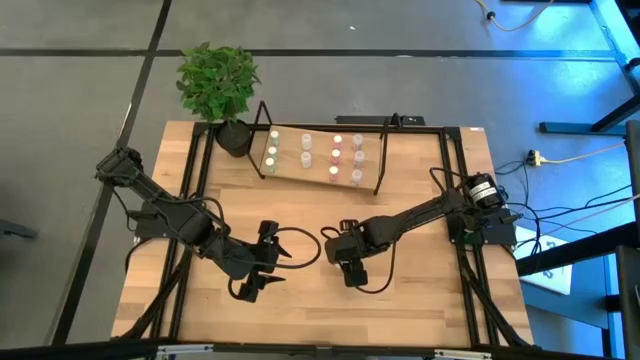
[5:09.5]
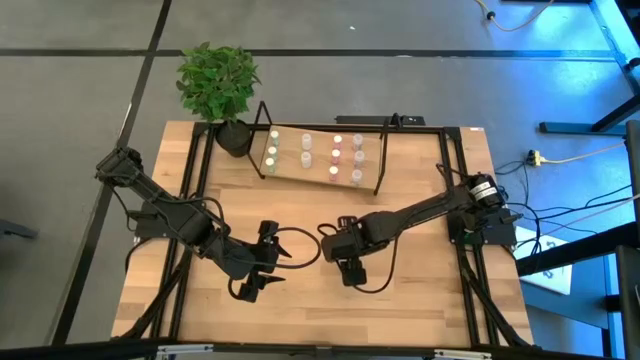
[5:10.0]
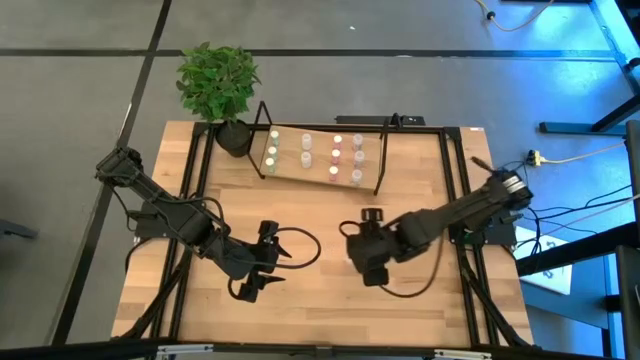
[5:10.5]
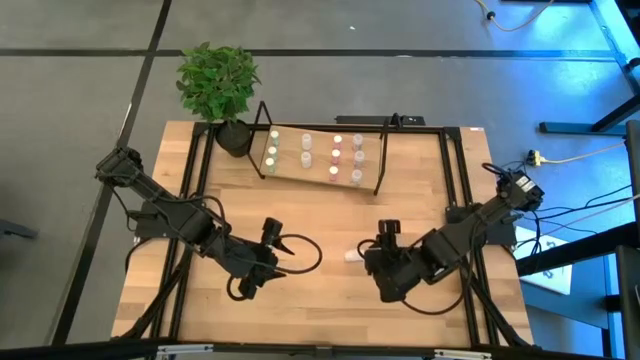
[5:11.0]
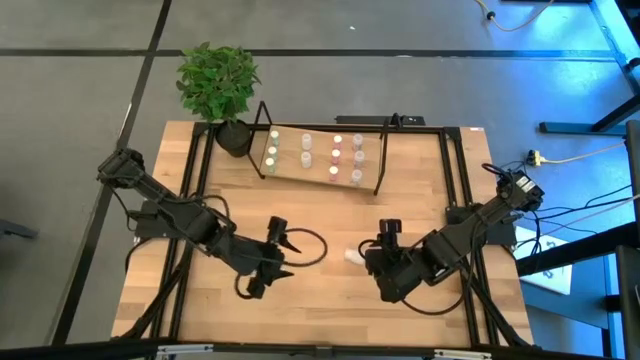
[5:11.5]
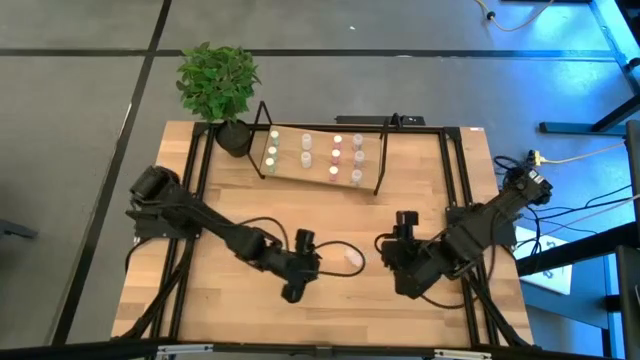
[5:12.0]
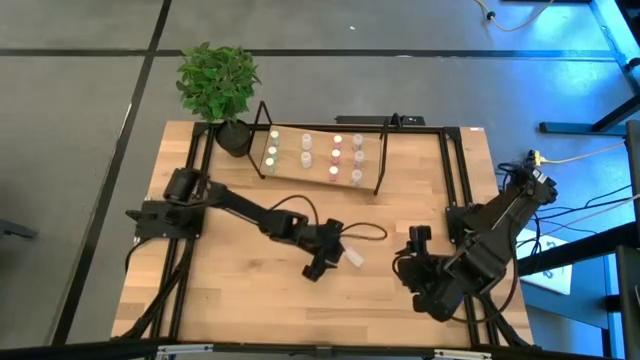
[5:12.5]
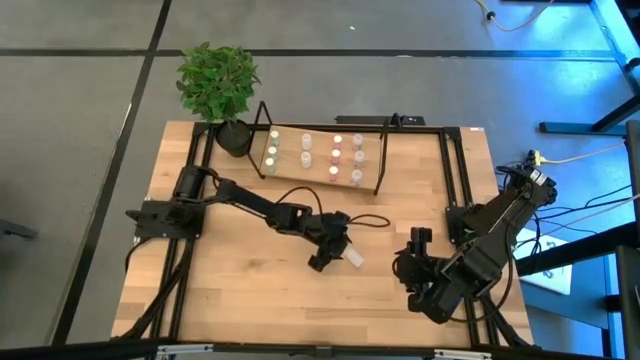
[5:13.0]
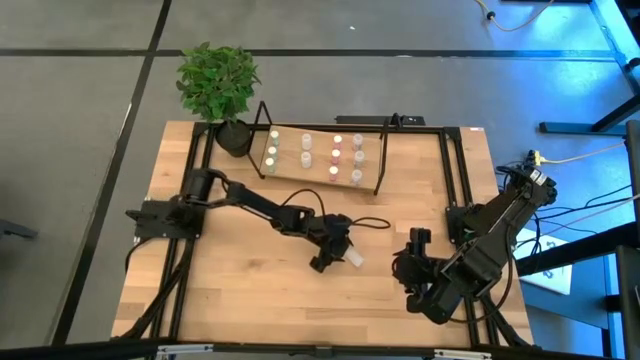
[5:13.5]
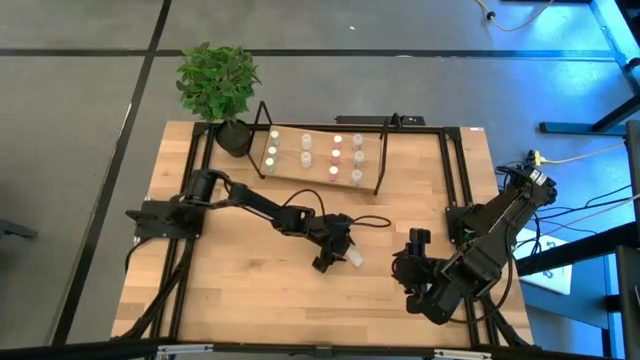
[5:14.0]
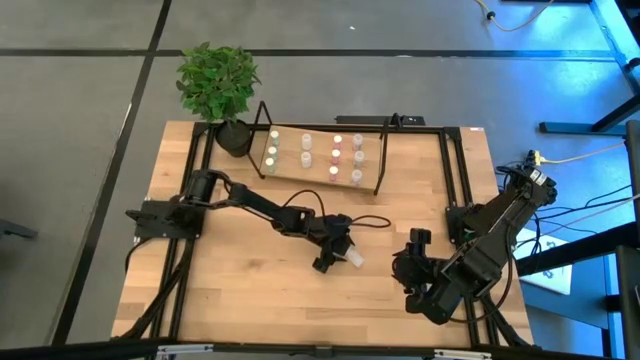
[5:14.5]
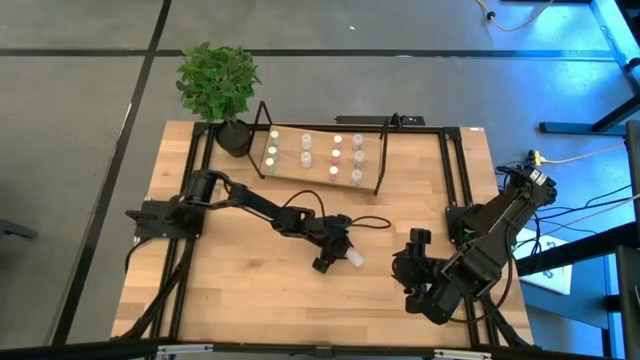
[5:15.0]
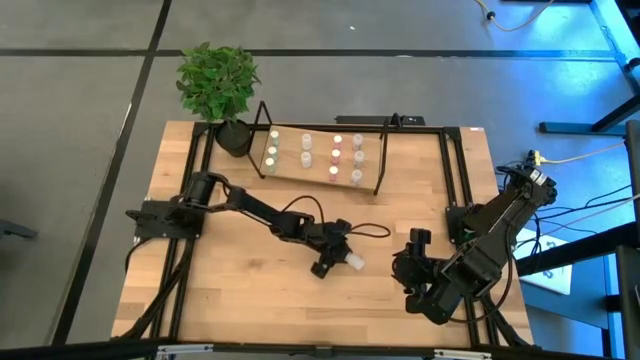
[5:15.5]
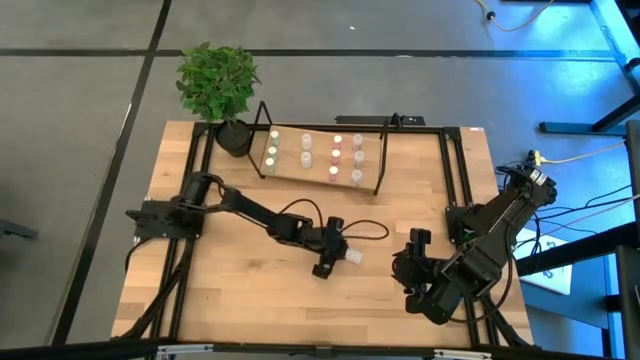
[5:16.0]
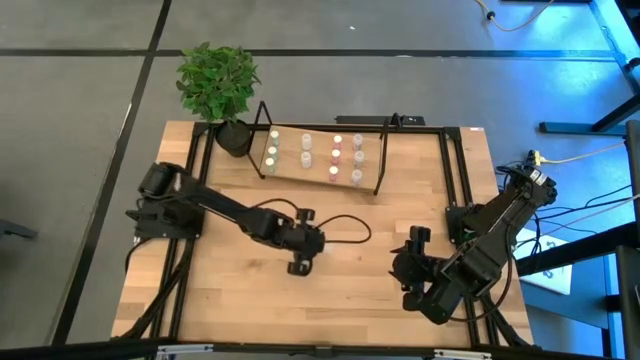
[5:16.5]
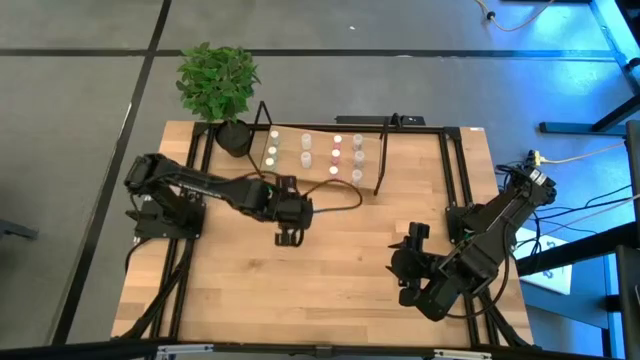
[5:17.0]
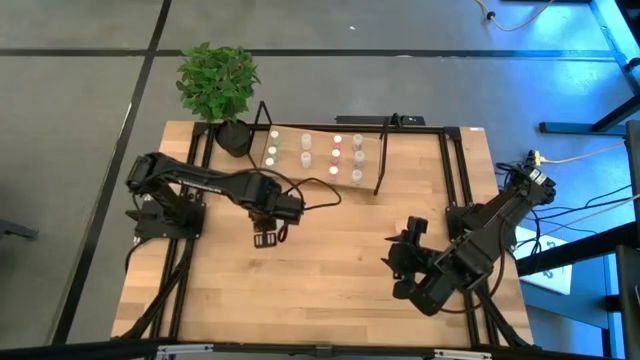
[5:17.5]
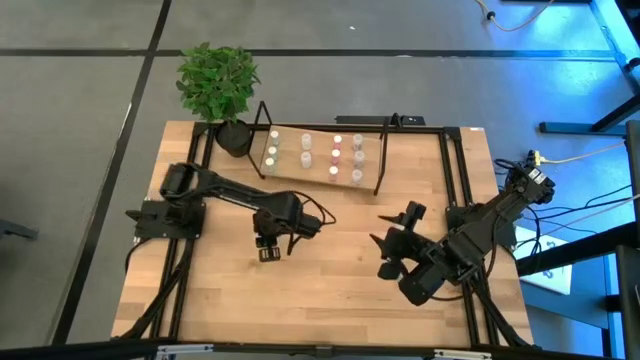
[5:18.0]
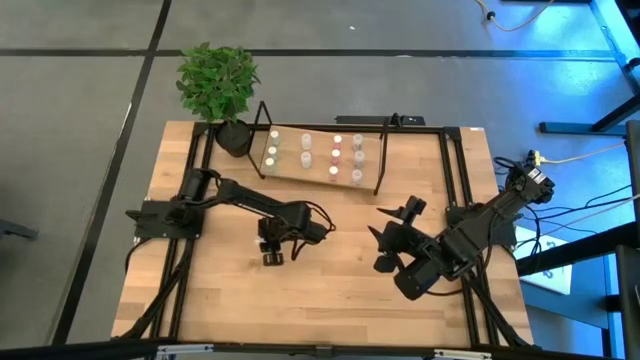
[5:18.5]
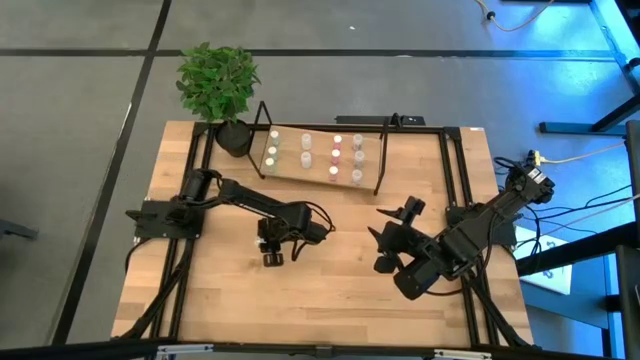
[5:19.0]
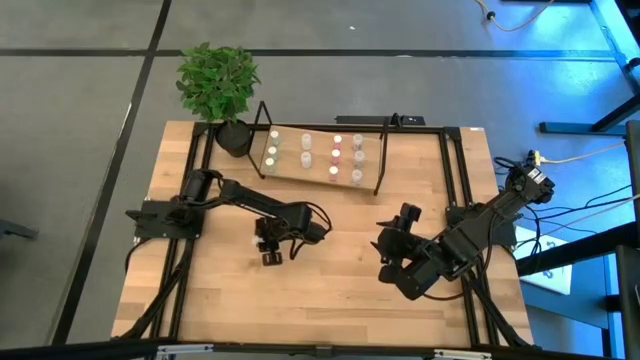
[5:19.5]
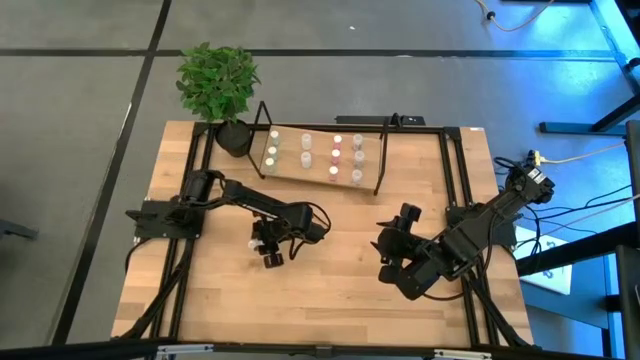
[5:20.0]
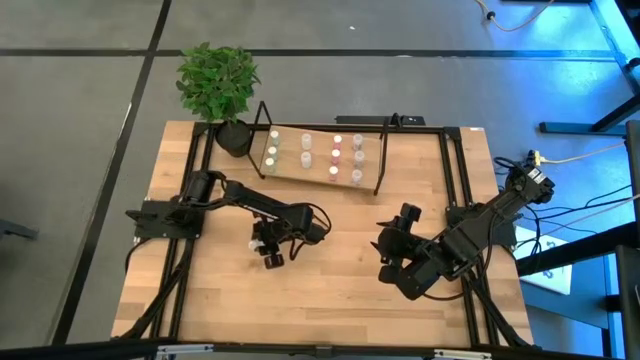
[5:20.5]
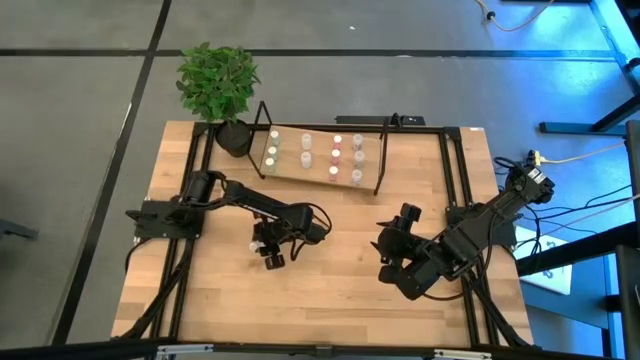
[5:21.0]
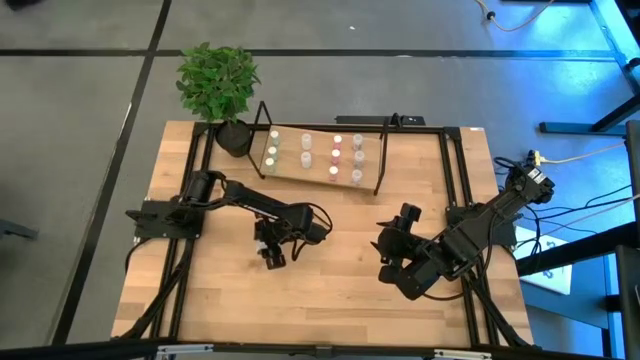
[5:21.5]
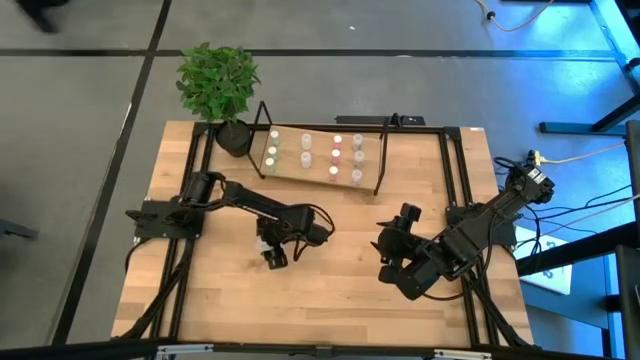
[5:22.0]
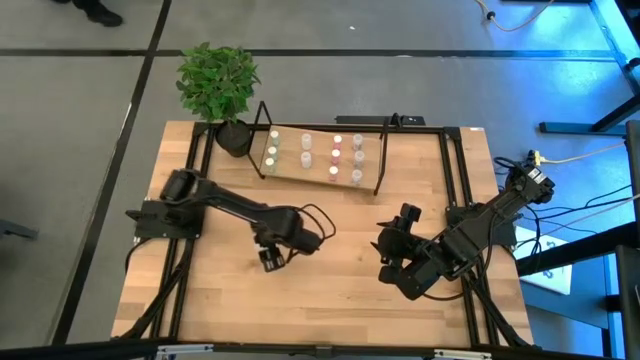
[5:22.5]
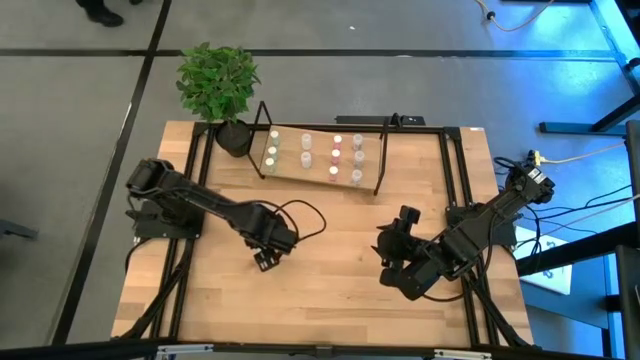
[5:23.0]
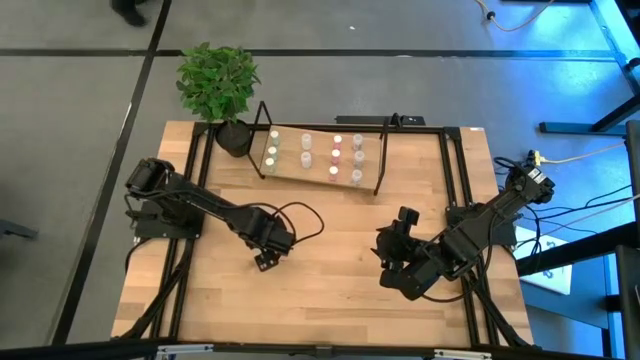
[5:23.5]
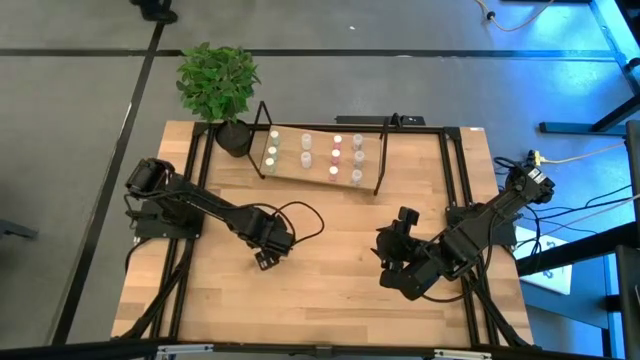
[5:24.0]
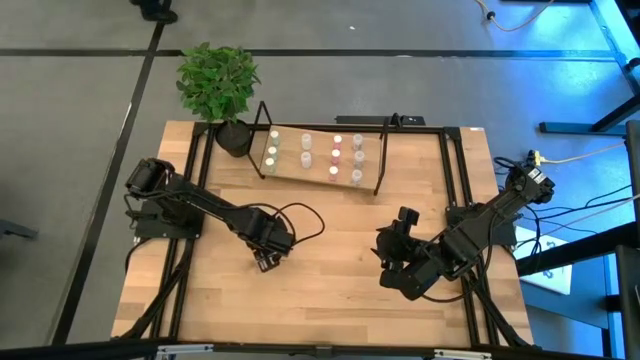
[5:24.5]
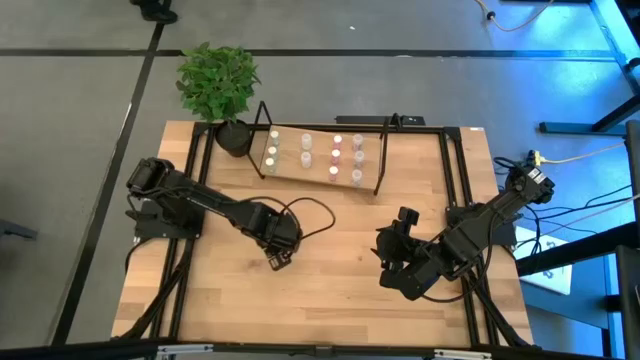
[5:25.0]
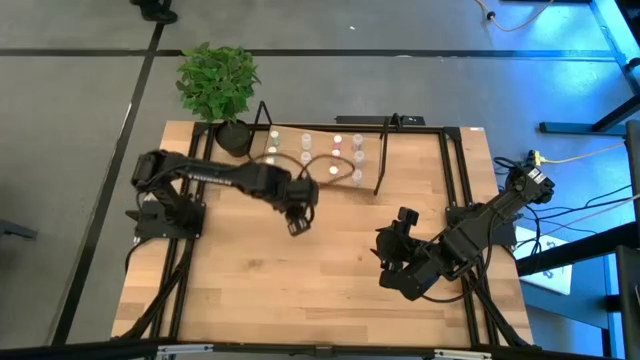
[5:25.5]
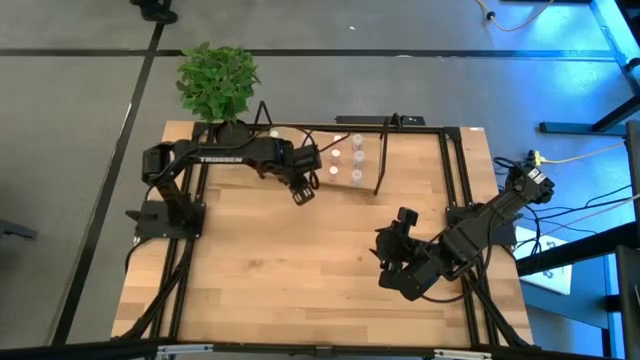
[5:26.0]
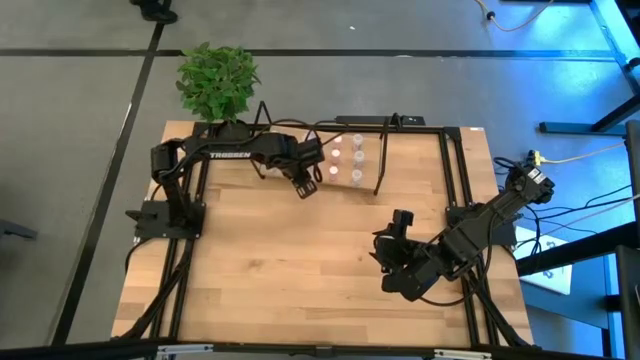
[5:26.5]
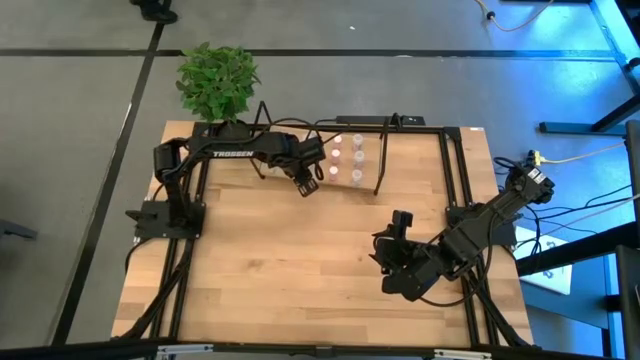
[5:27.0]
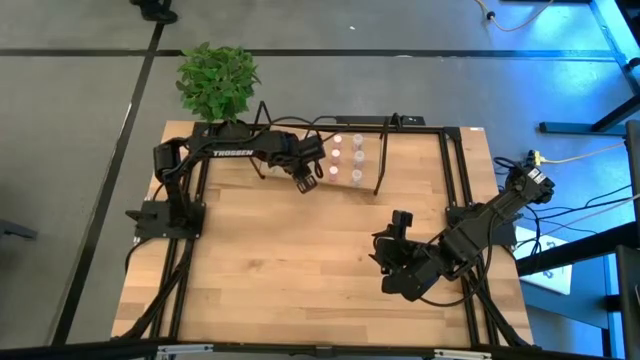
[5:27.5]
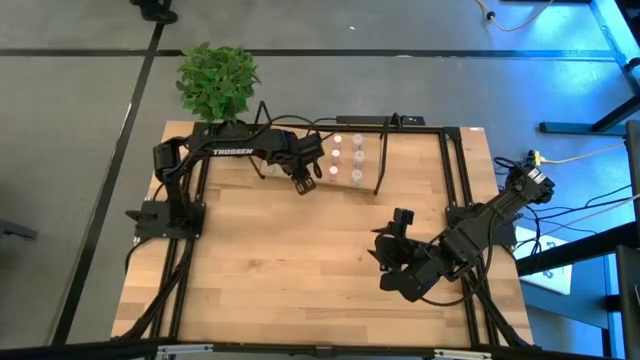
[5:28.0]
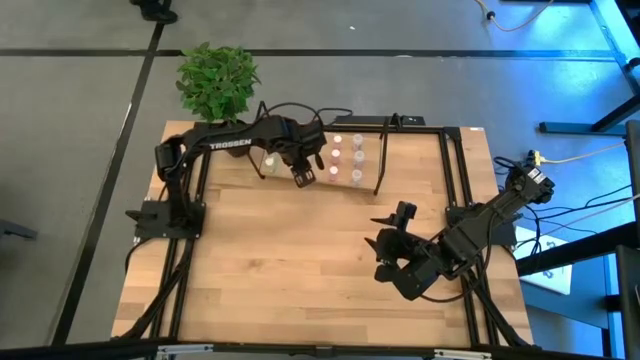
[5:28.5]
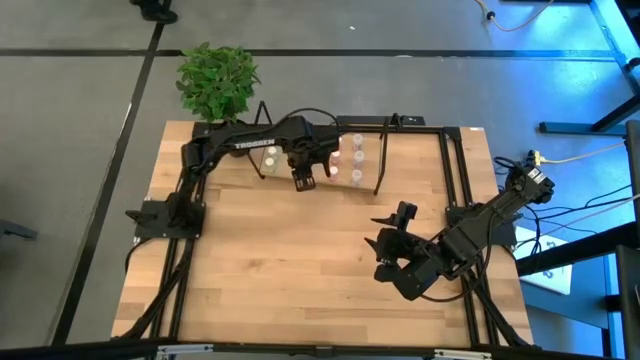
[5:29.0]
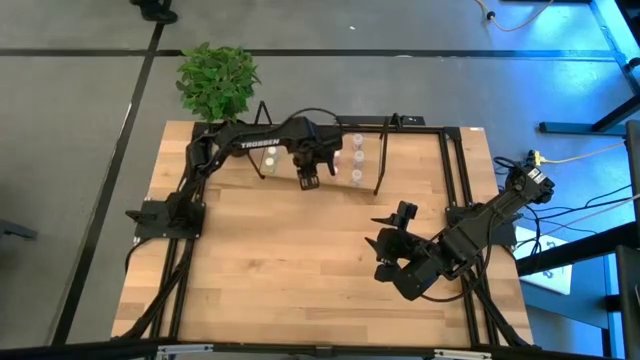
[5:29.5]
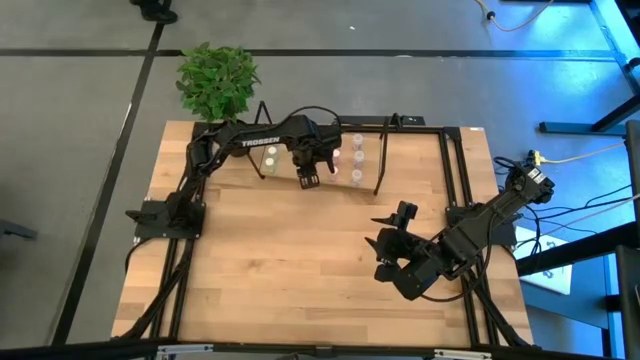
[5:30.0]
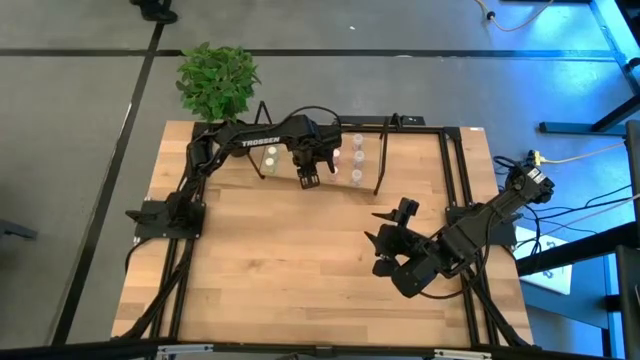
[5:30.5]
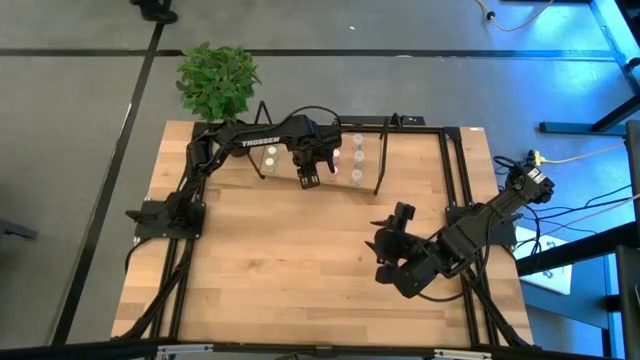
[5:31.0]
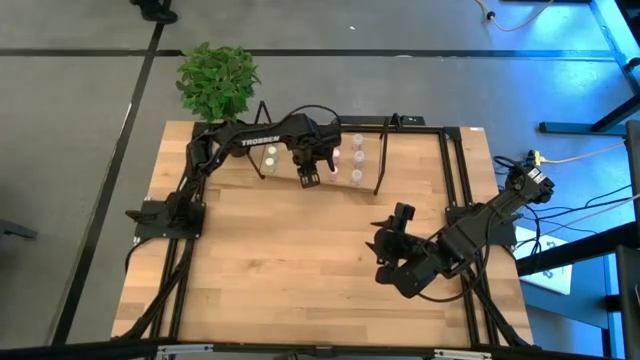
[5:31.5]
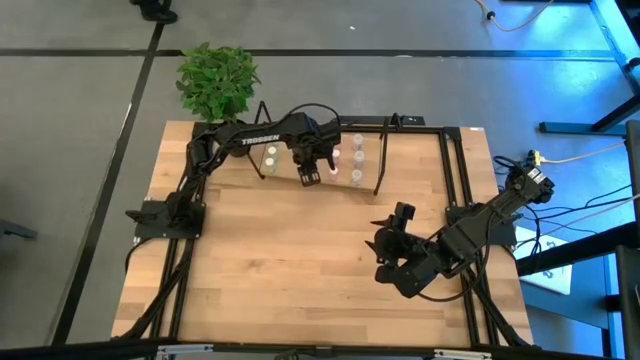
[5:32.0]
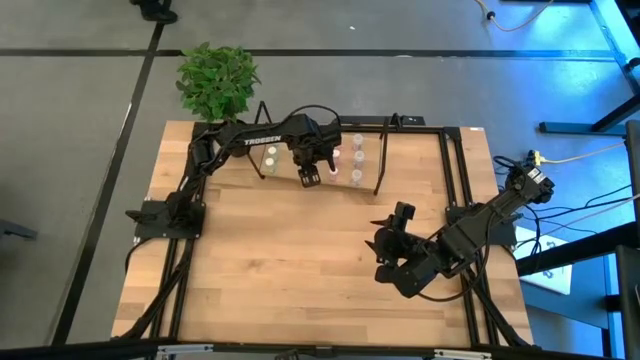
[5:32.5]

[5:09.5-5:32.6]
Task: Pick and place medicine bottles onto shelf by color
Put the white medicine bottle on the shelf aligned with the other white medicine bottle
